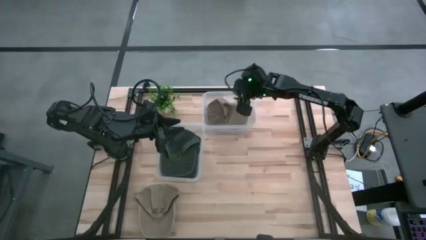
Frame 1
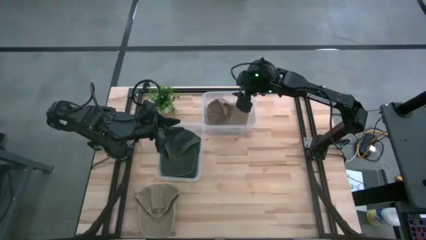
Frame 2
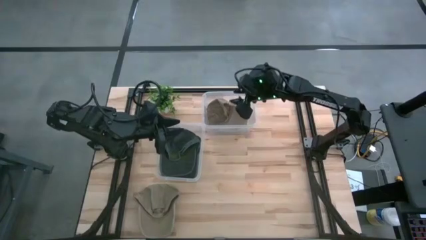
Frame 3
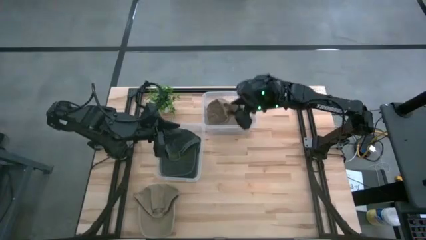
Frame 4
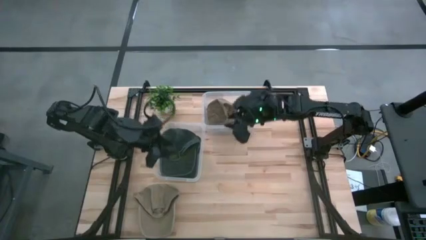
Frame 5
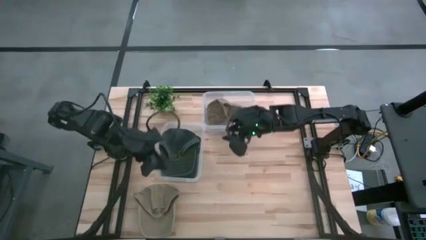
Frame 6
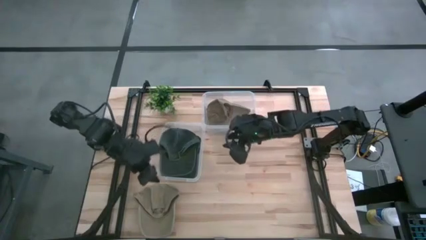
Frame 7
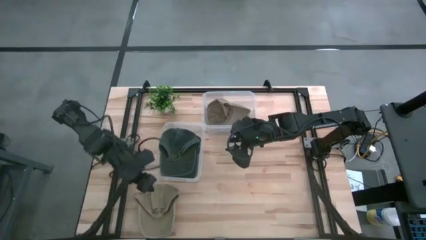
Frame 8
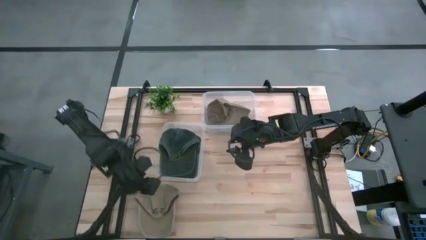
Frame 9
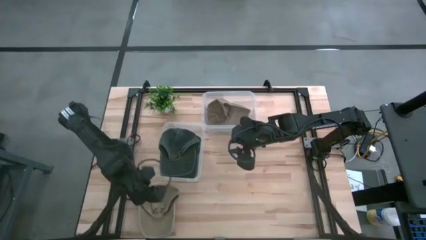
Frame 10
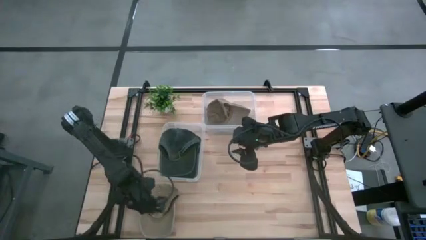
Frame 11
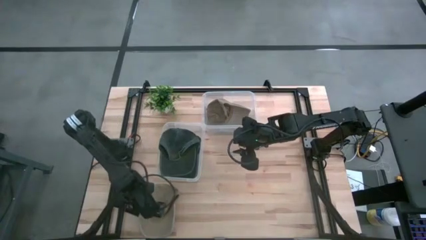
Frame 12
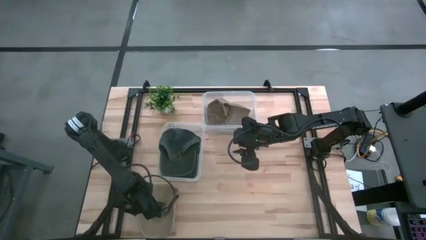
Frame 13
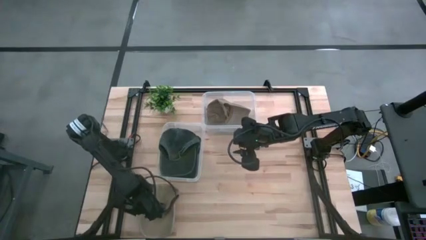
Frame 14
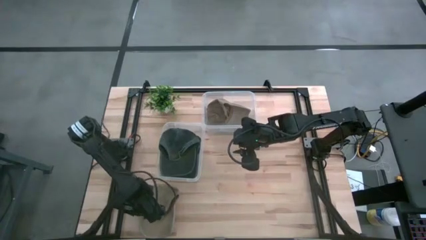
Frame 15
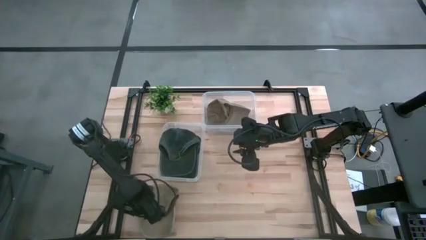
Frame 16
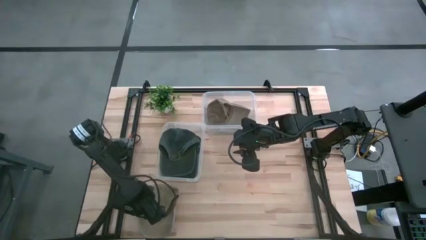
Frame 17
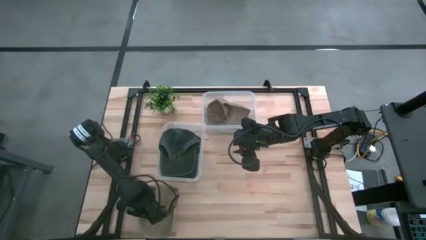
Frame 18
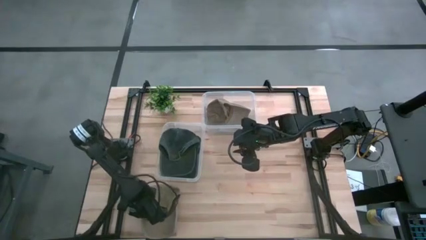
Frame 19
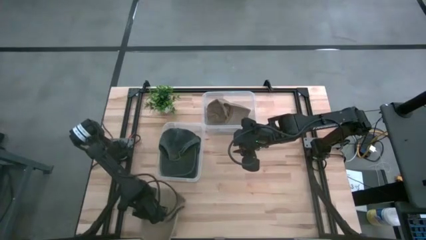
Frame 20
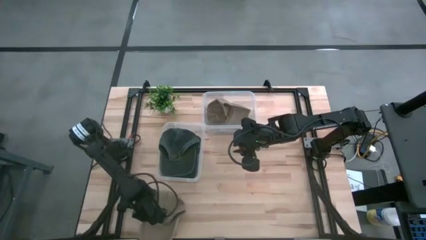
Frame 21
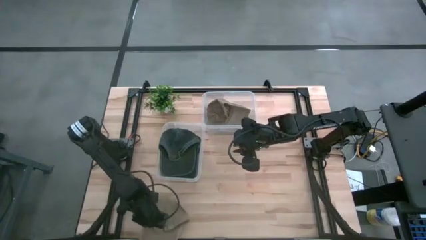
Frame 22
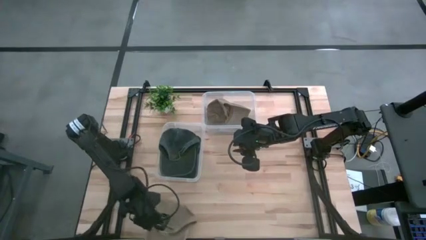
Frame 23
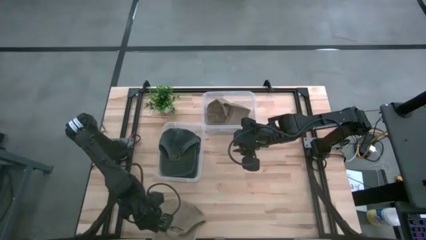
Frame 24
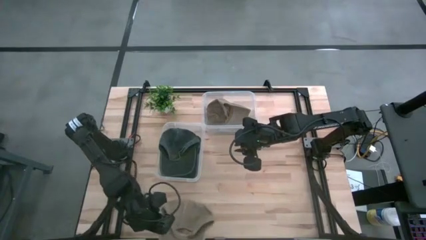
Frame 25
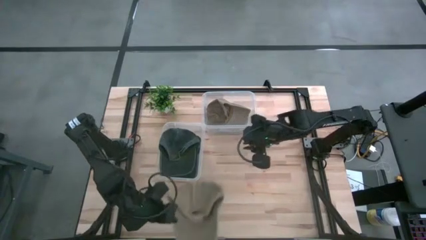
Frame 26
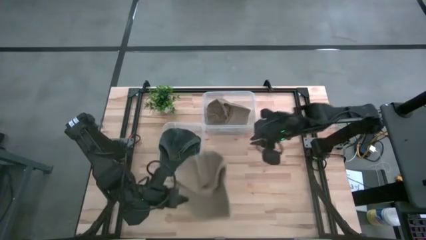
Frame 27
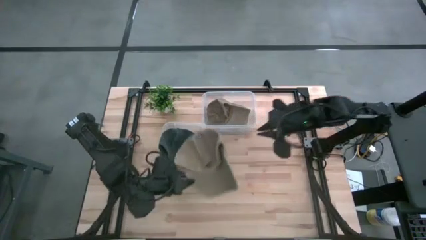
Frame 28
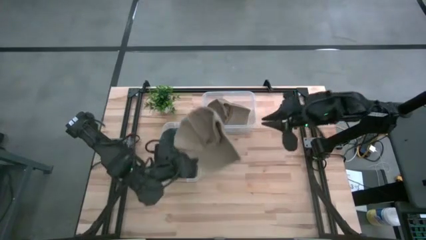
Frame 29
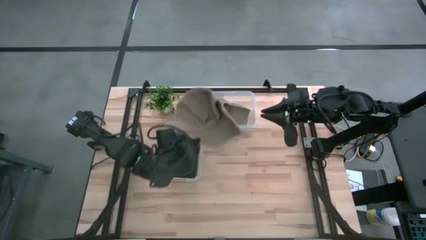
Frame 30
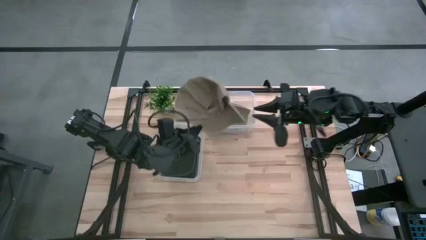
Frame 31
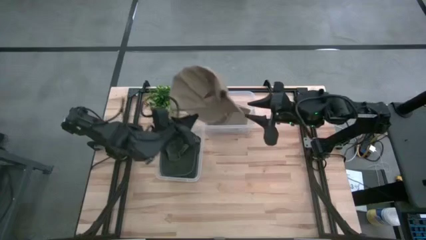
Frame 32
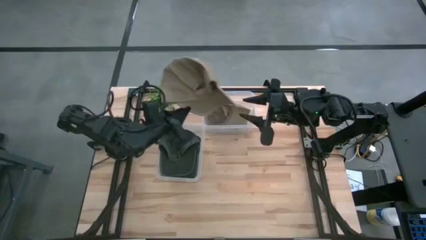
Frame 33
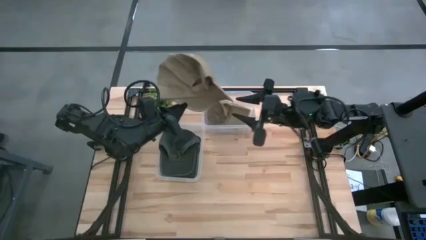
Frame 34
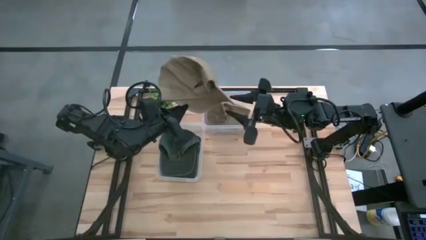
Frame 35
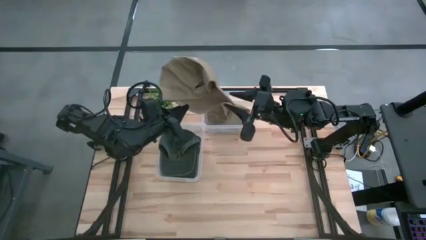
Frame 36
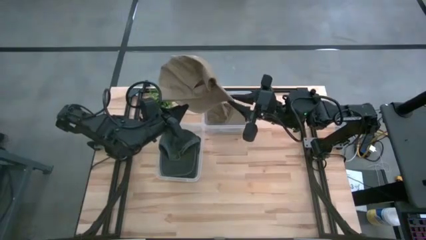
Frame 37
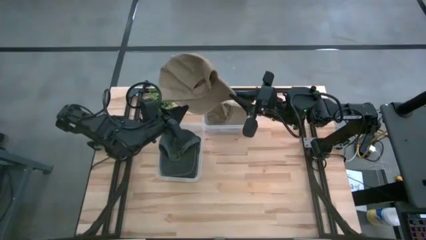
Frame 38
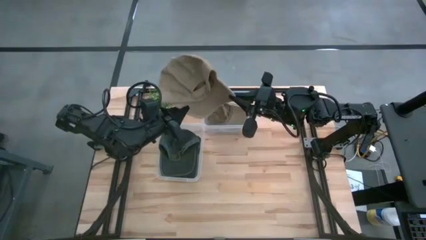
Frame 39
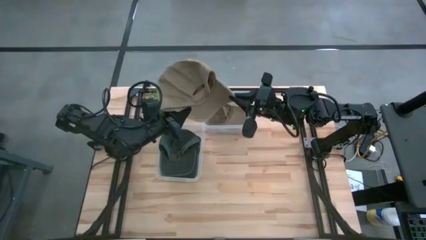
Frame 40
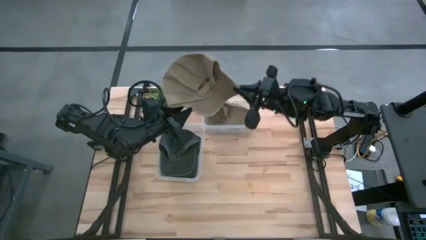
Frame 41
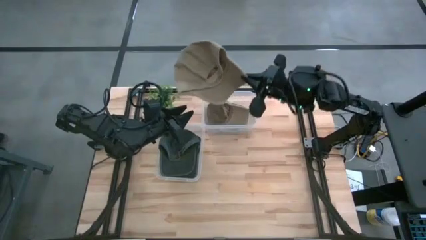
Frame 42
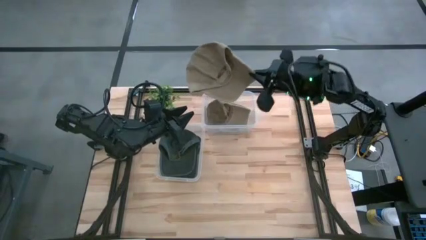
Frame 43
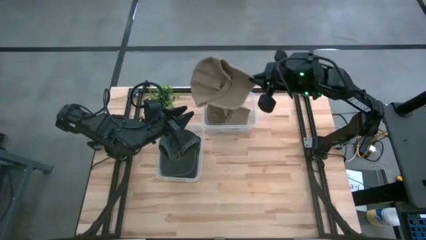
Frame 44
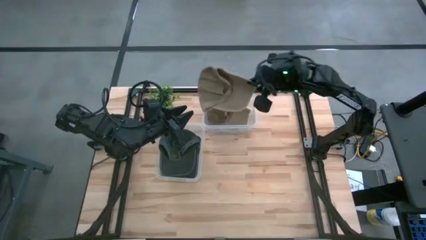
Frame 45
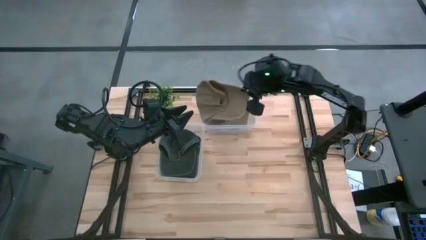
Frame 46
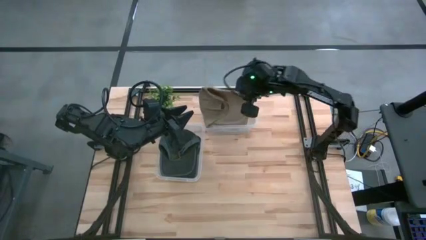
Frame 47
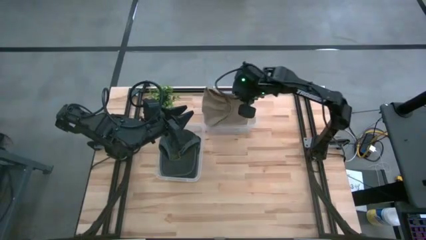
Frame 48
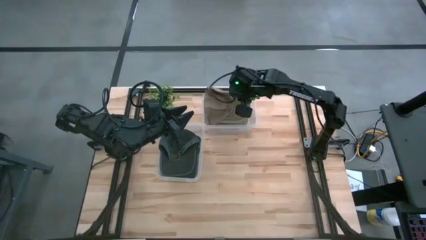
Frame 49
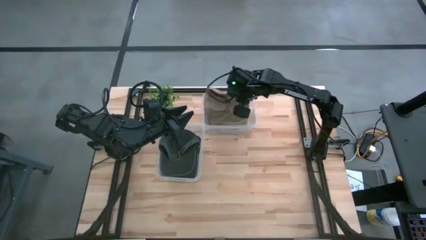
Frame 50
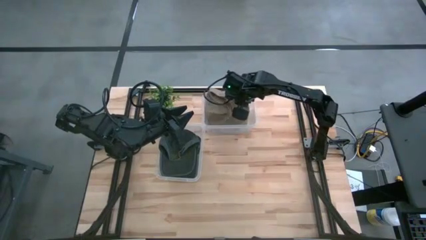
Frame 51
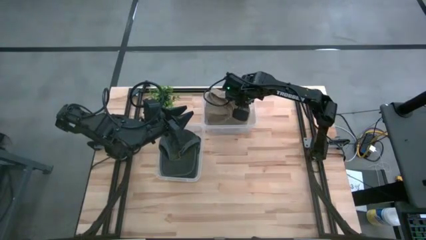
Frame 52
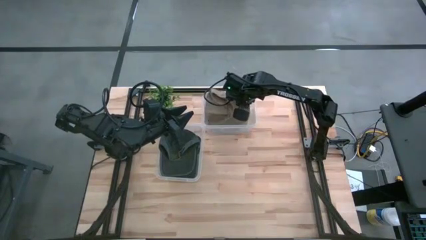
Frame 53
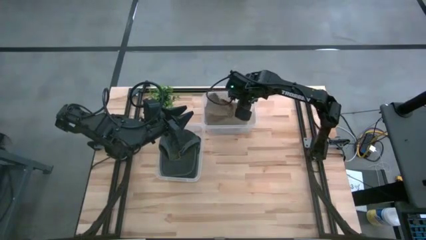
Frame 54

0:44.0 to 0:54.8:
Task: Pick & Place hat
Put the brown cap into the top transparent bin

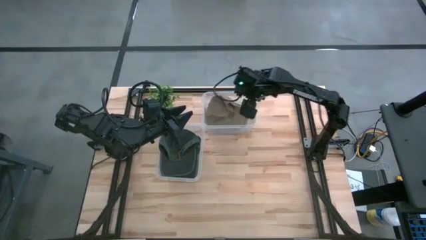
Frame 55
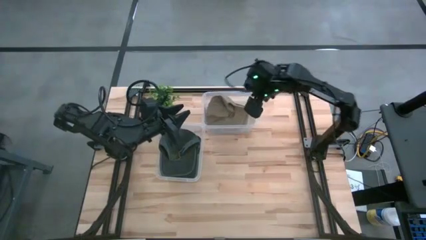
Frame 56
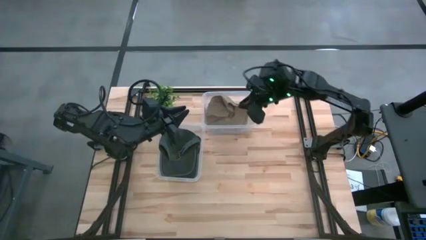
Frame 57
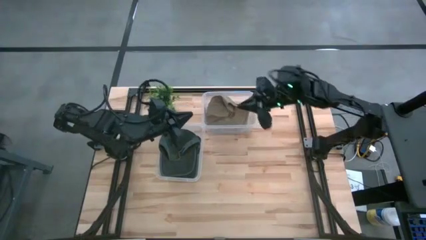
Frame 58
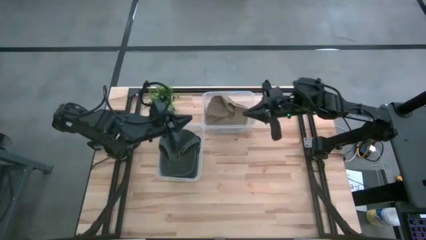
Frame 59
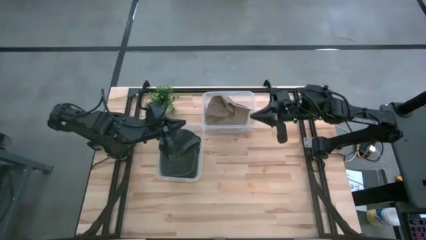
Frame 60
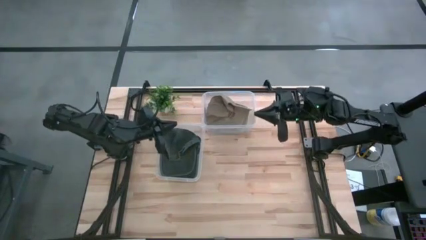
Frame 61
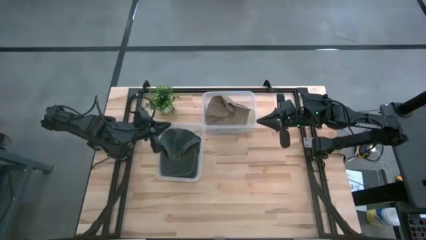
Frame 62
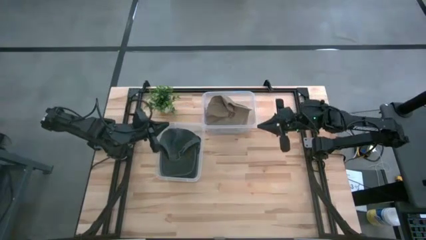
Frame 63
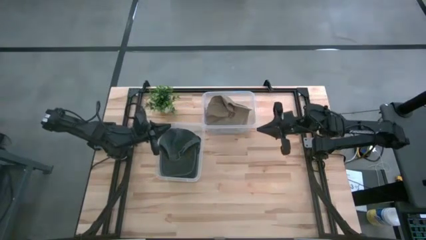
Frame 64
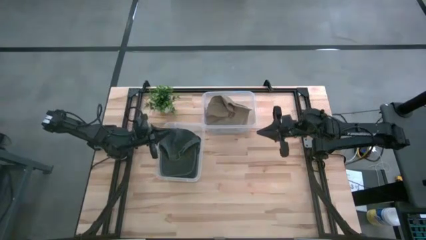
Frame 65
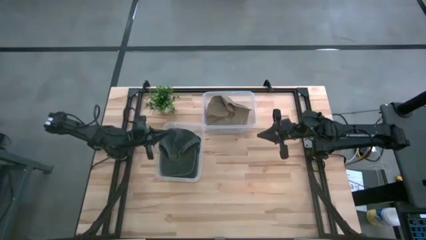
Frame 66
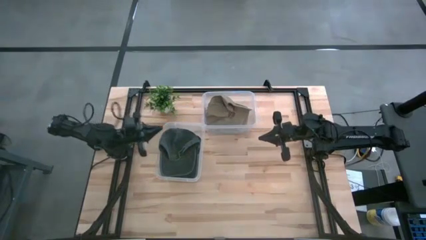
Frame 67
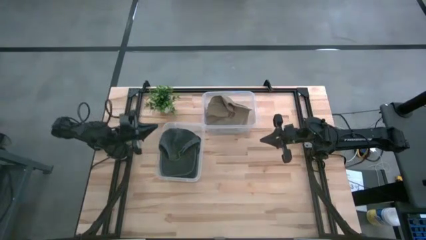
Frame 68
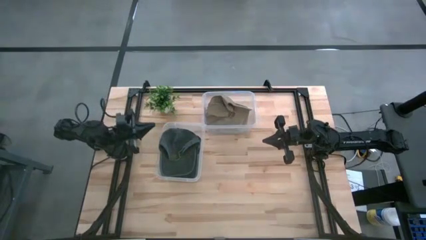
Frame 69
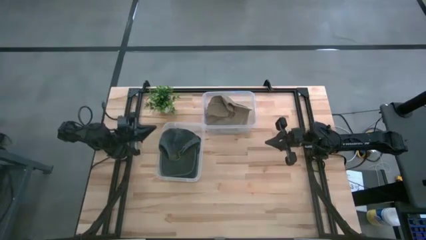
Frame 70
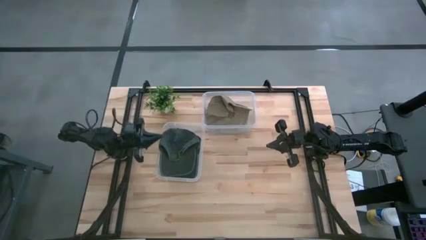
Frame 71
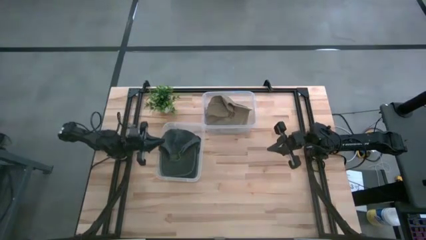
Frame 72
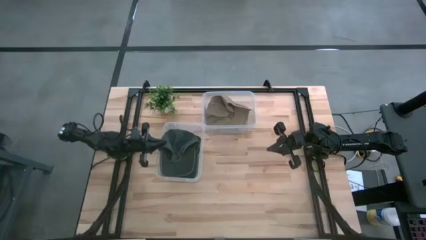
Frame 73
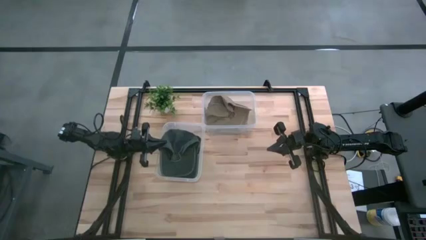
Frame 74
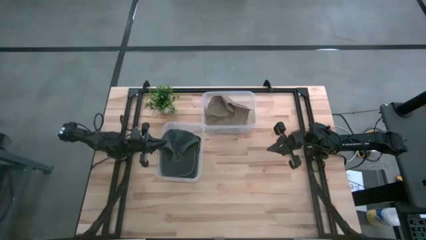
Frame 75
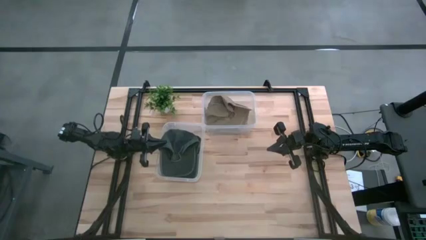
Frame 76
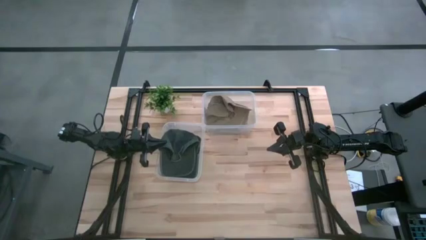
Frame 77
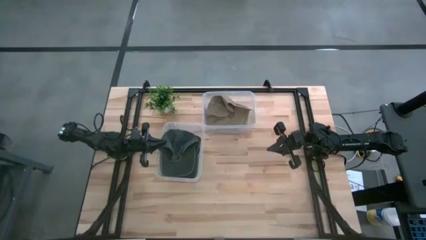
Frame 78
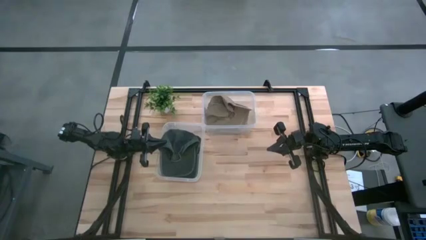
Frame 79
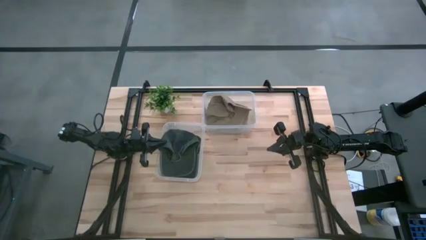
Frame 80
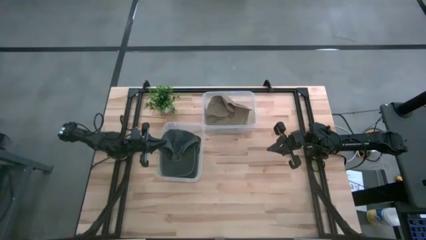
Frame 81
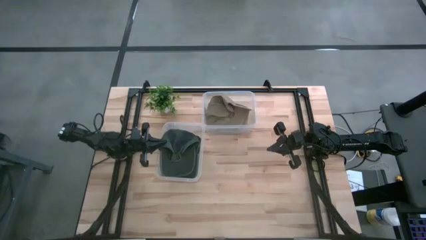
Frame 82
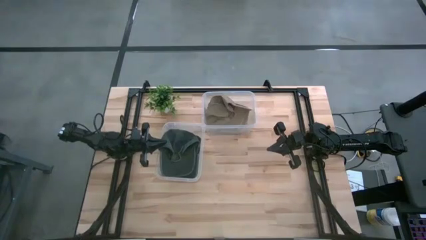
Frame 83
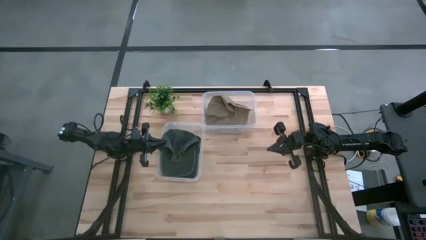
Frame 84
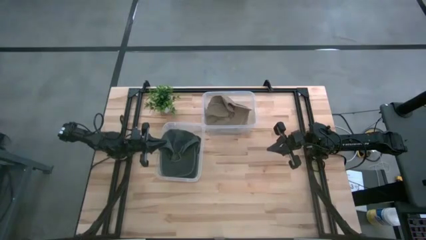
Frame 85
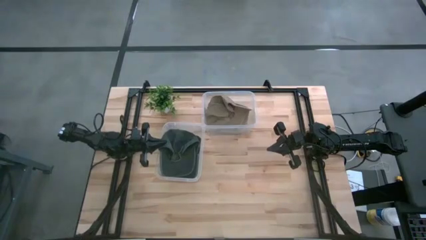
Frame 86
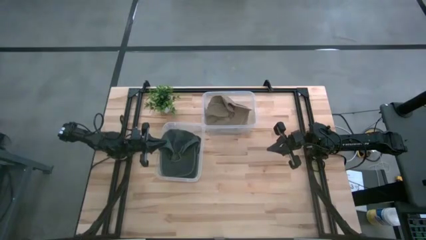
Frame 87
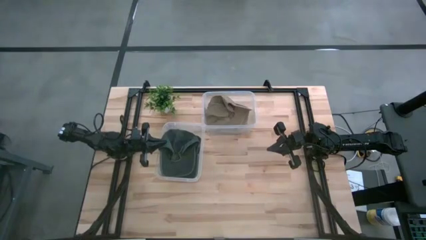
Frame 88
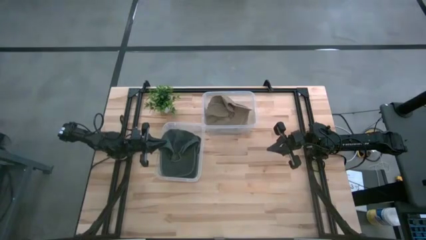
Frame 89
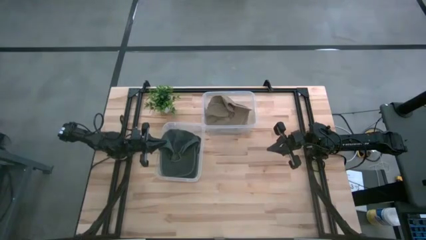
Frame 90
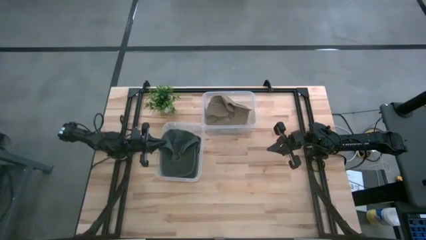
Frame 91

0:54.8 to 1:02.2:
Return to Home Position
